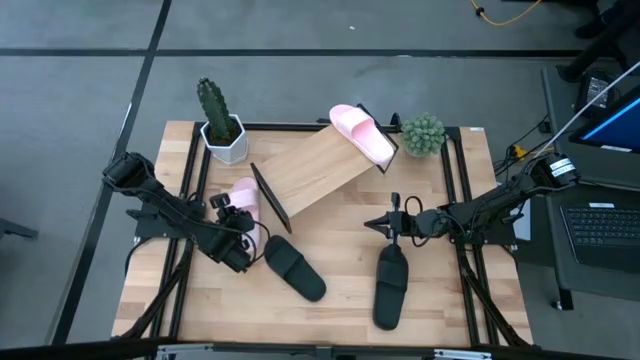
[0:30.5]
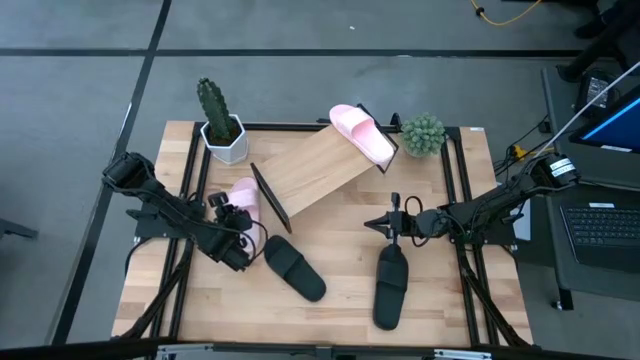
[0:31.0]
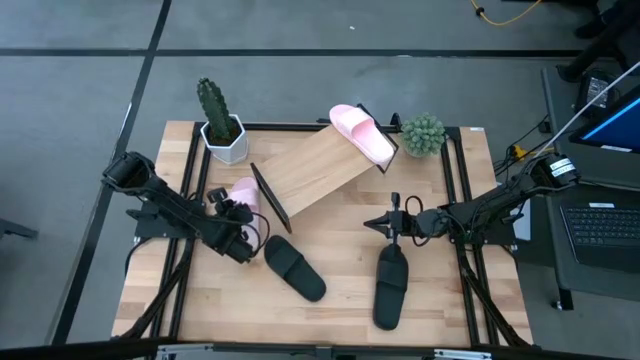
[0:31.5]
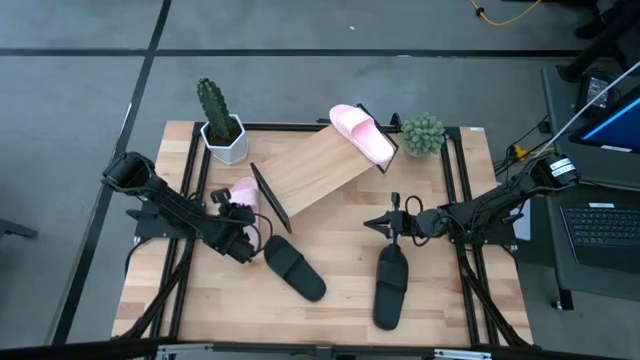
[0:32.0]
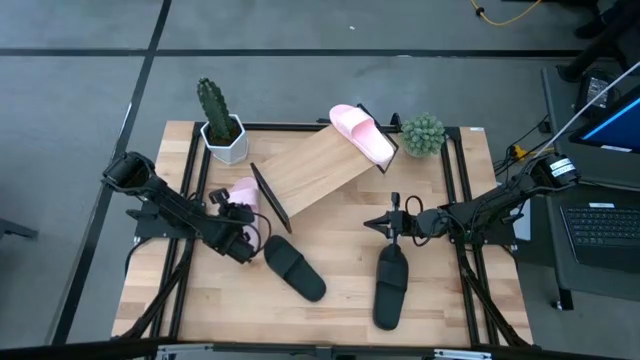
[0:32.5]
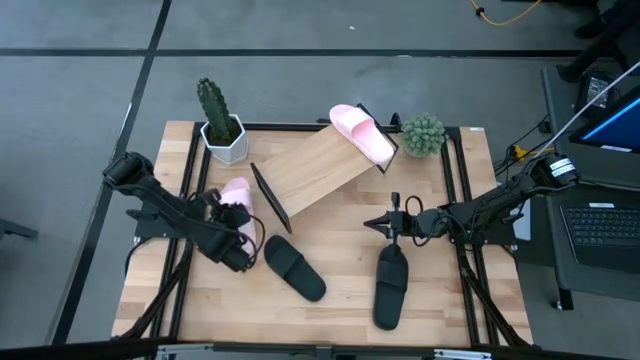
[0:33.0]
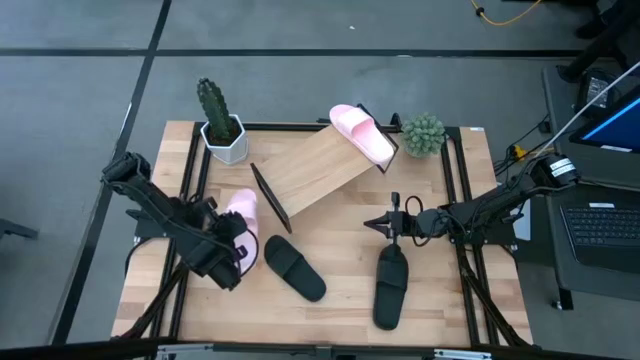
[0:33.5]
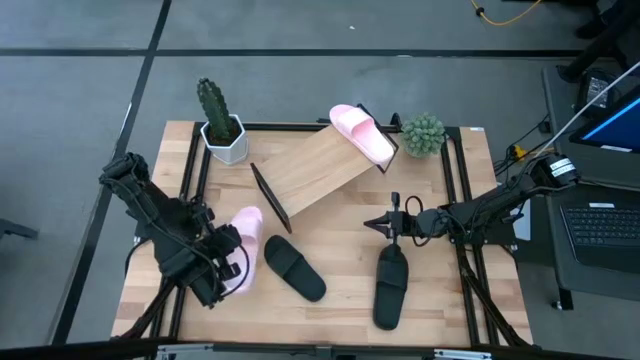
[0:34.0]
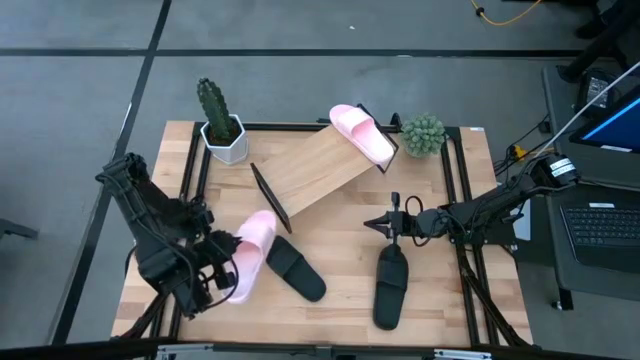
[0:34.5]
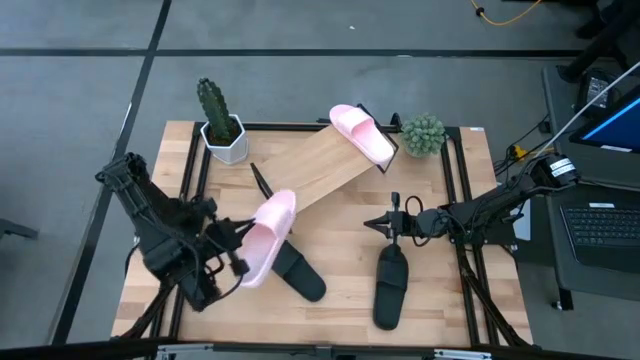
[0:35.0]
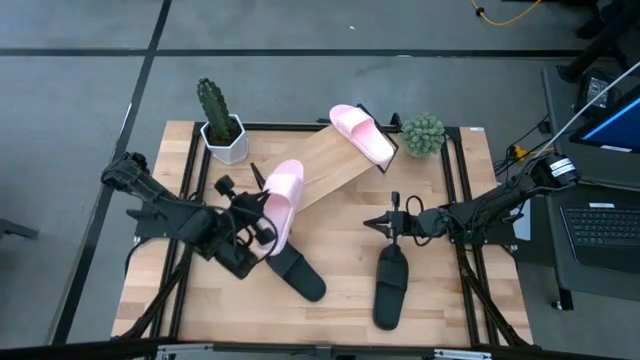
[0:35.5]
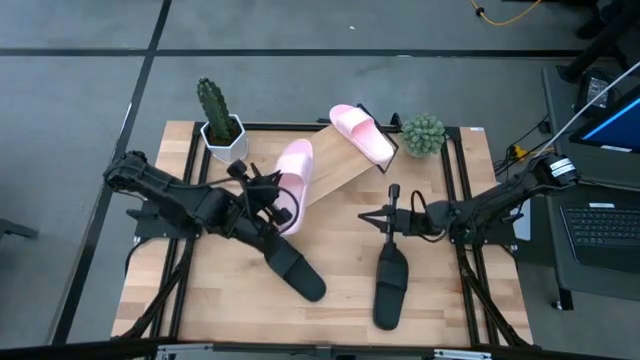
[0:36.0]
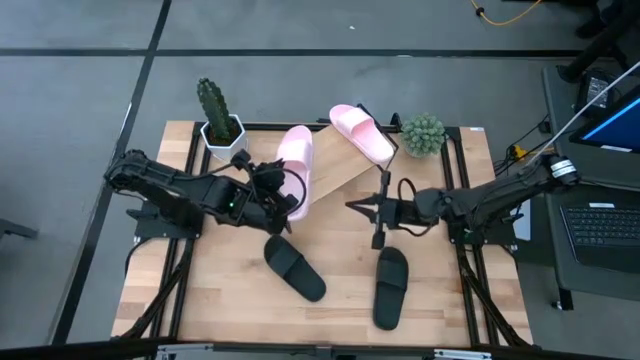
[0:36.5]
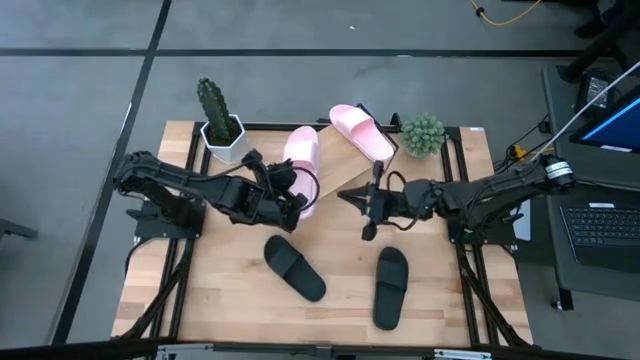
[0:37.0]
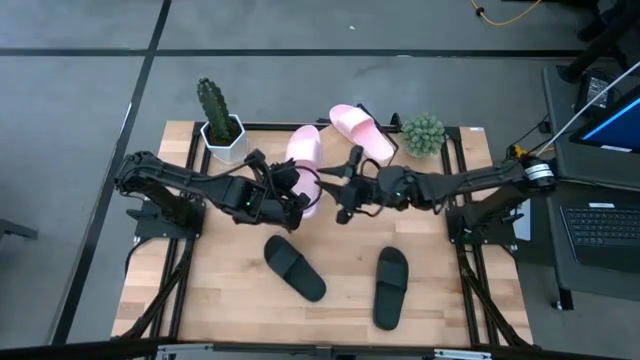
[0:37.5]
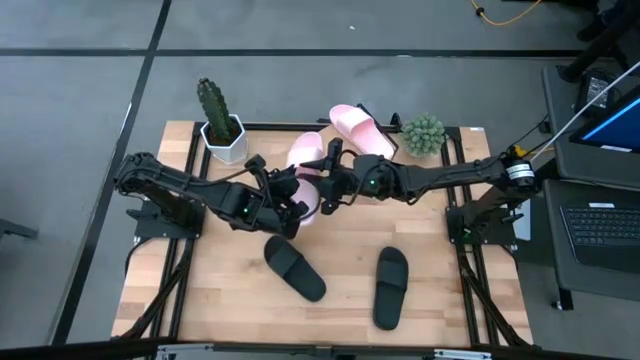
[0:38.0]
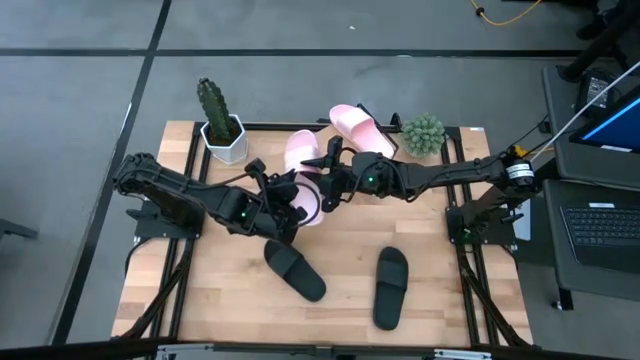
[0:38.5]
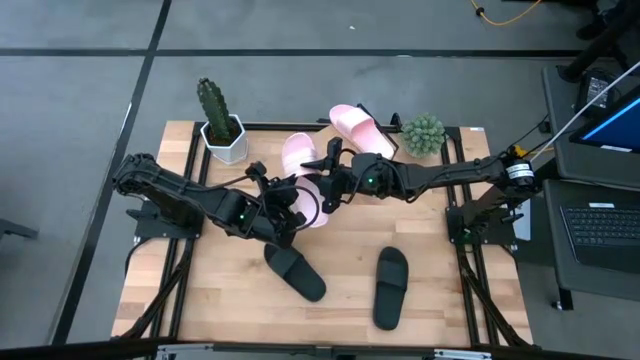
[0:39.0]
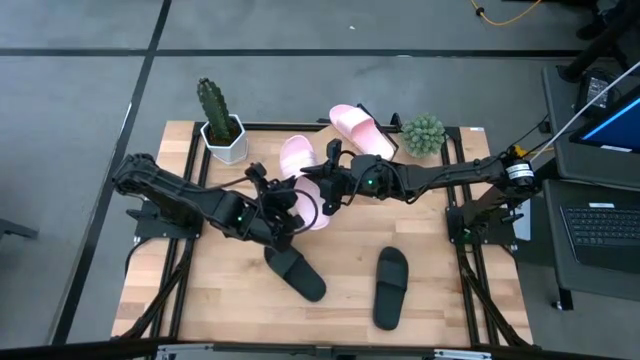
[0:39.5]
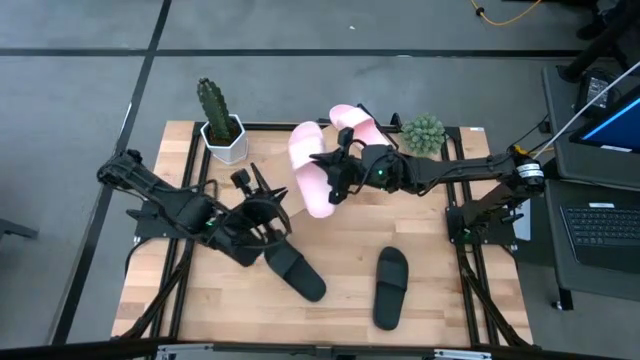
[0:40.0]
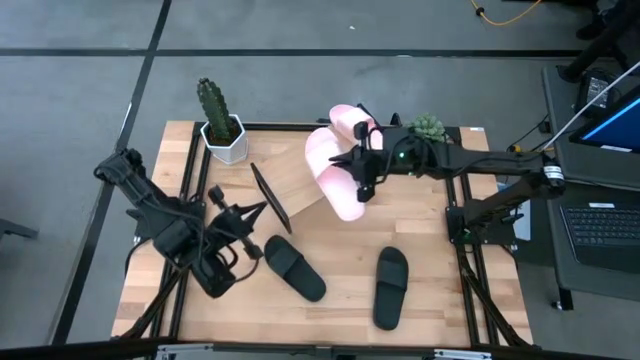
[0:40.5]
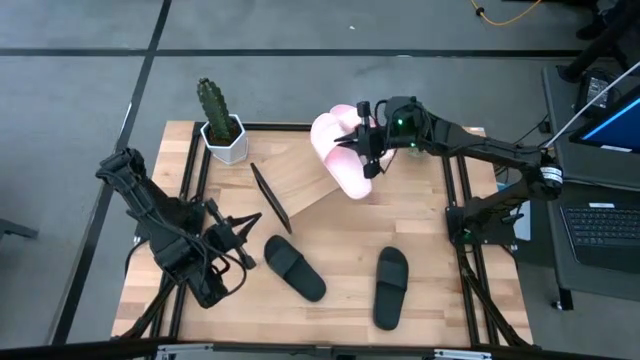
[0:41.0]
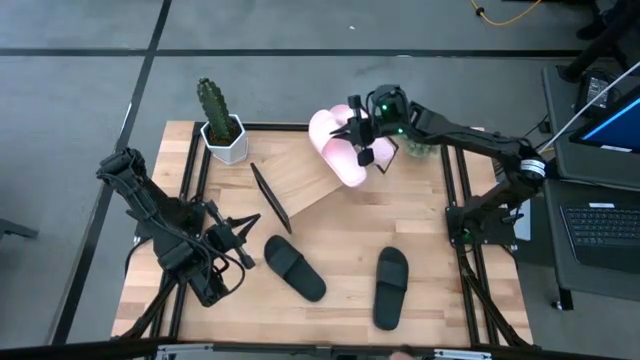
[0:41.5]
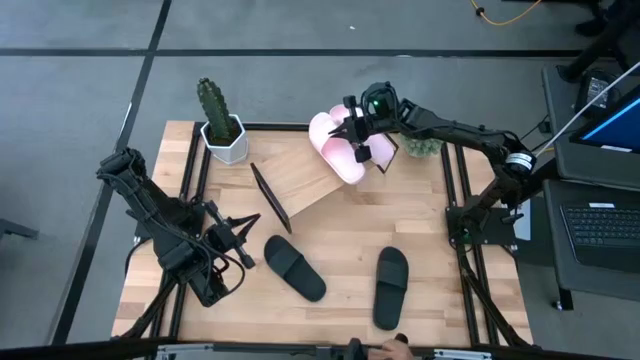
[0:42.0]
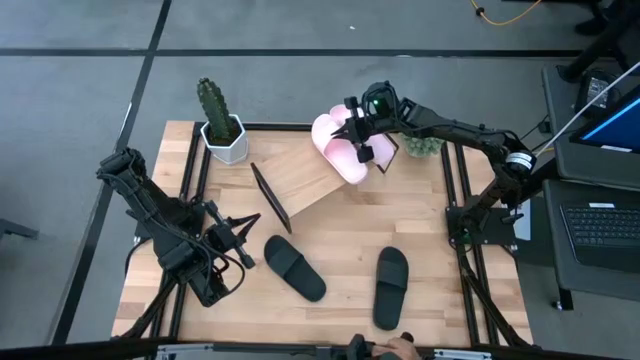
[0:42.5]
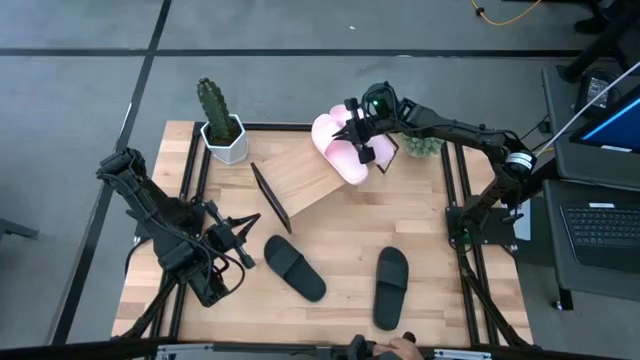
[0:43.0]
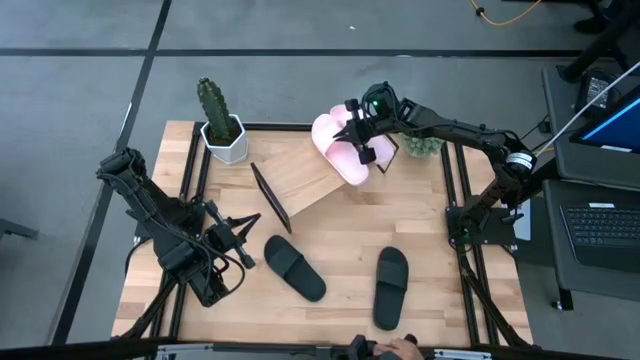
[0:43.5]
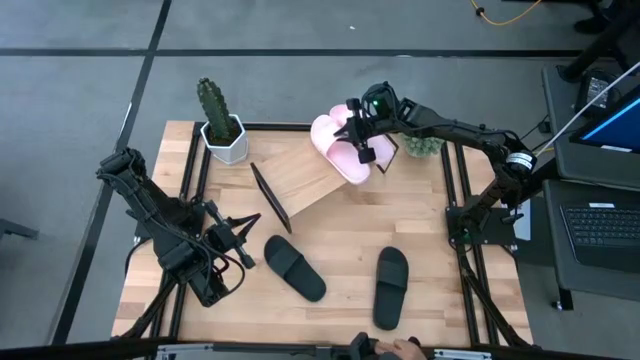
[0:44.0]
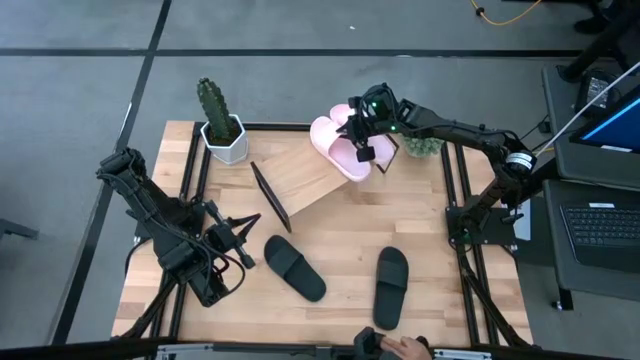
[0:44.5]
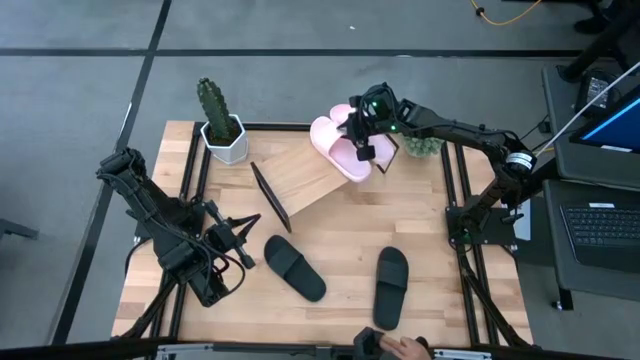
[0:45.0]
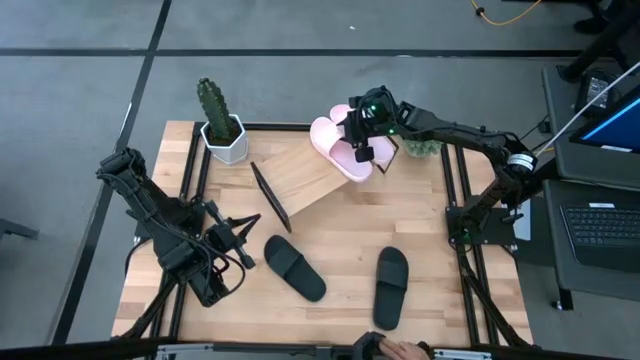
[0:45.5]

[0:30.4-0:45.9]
Task: Pick and place slides into the shelf
Put the pink slides on the shelf

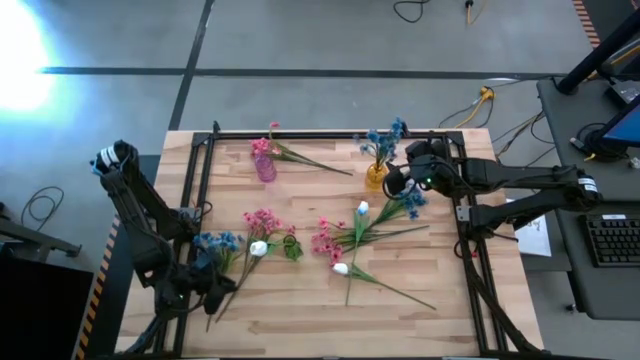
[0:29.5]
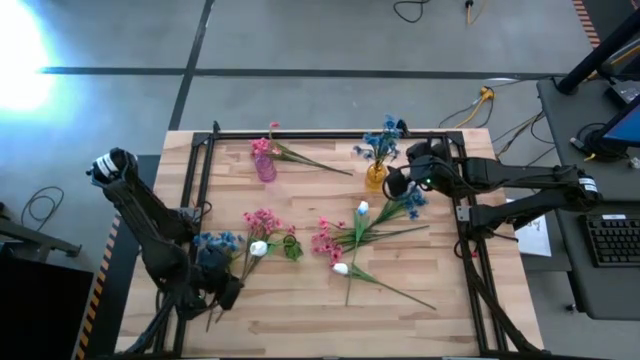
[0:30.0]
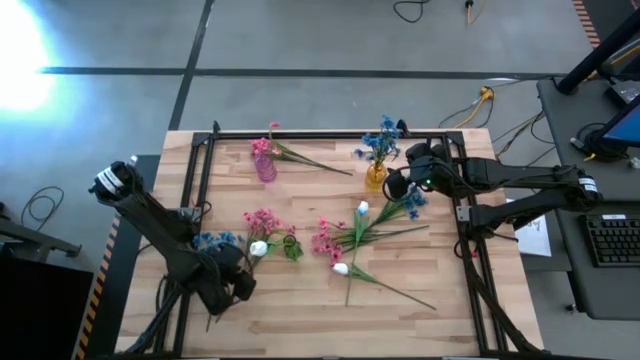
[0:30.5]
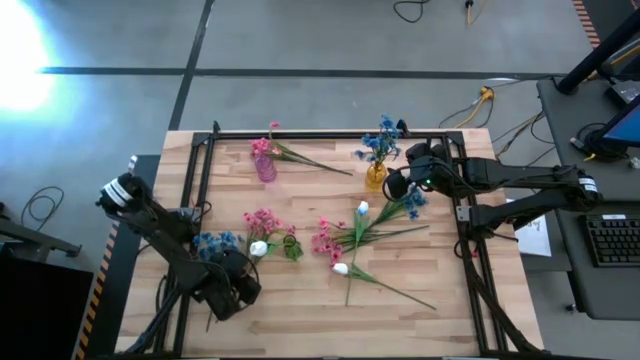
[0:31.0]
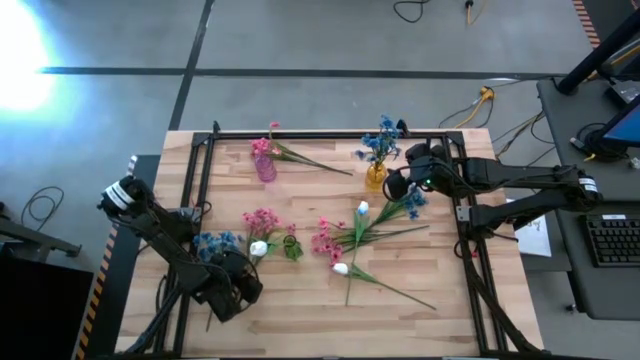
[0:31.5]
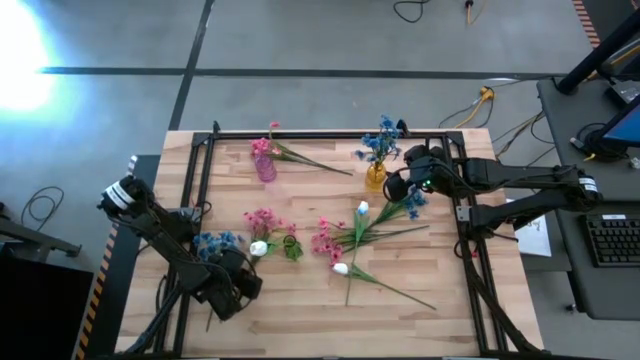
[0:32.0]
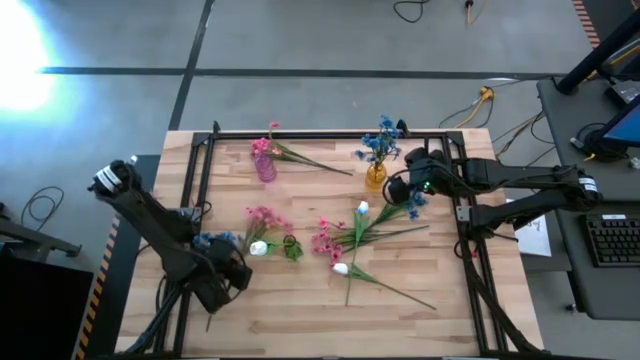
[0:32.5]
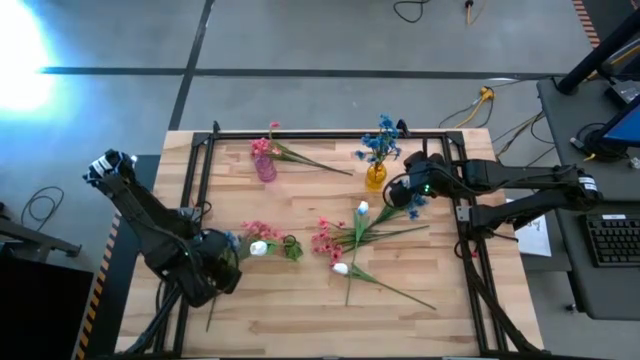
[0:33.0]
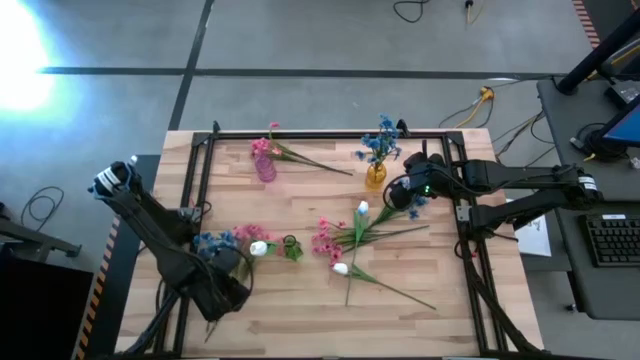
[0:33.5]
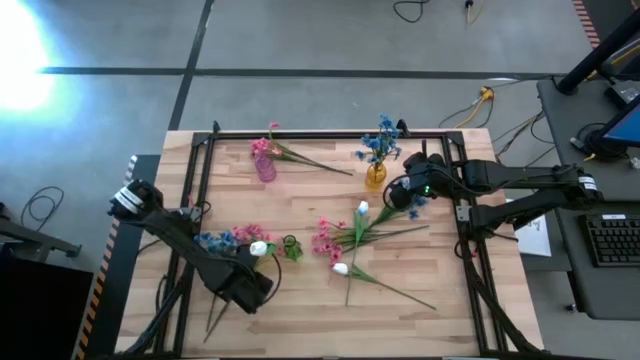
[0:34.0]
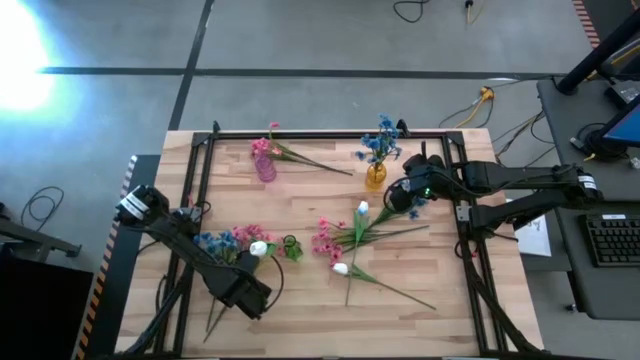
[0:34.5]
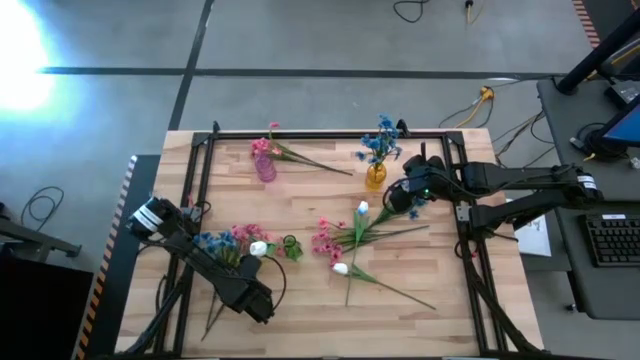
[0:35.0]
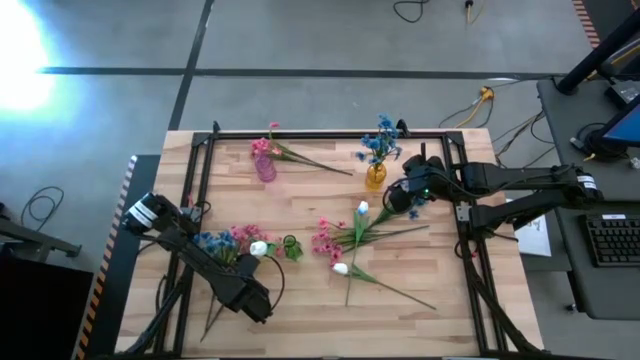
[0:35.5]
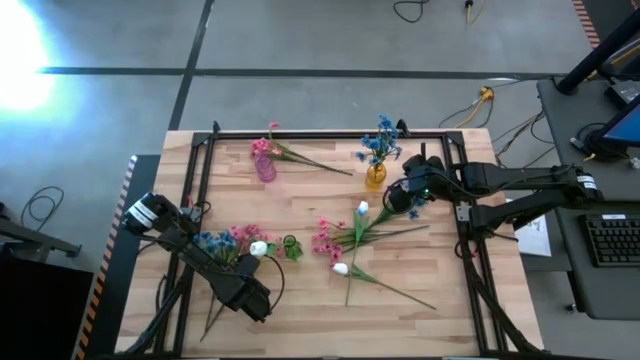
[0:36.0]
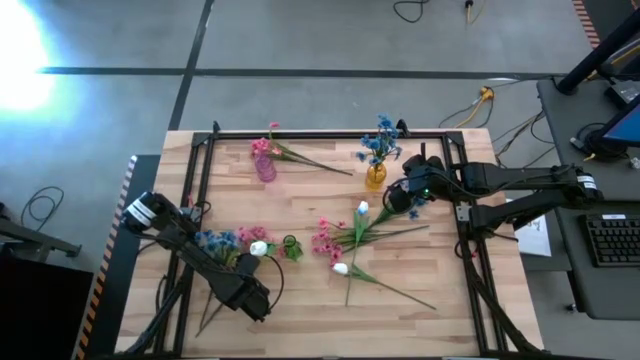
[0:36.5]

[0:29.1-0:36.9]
Task: Sort flowers into vase by color
Put the bottom left pink flowers into the pink vase
